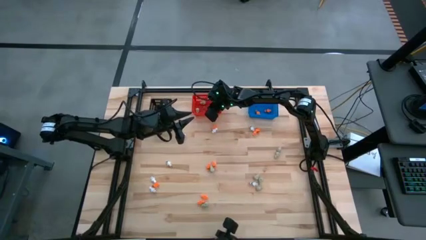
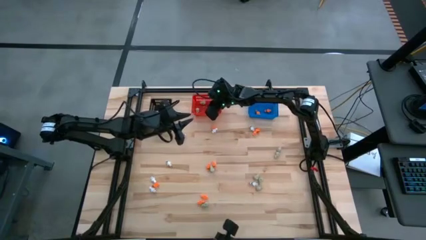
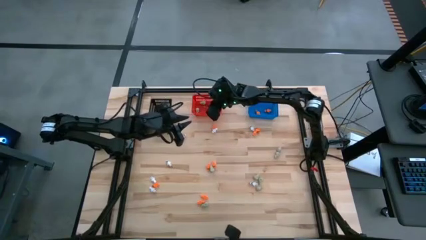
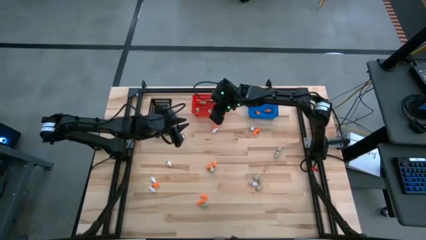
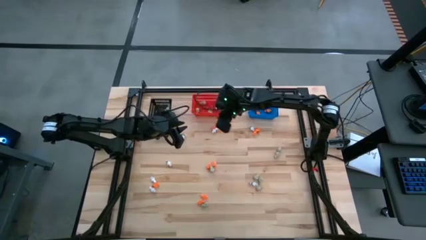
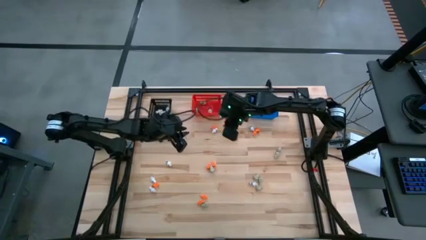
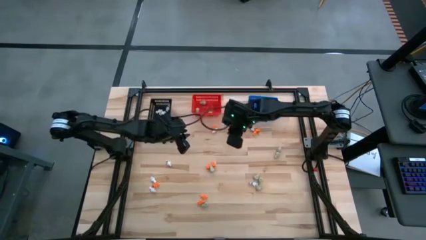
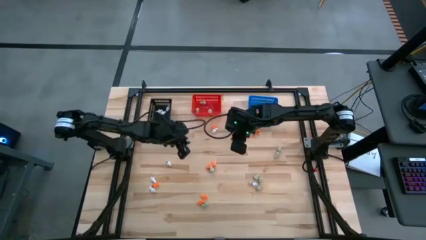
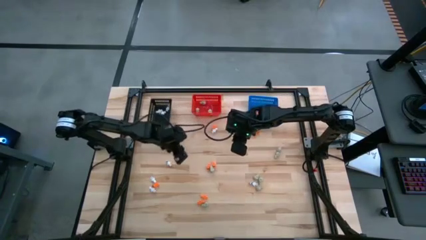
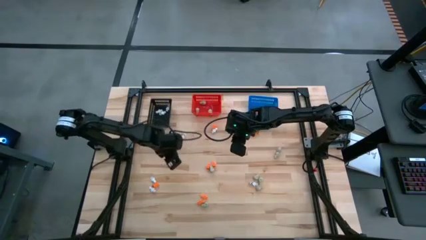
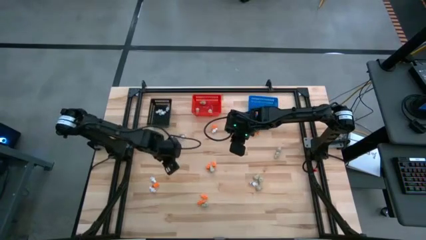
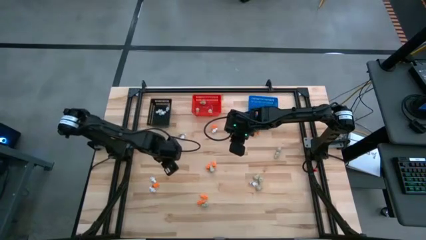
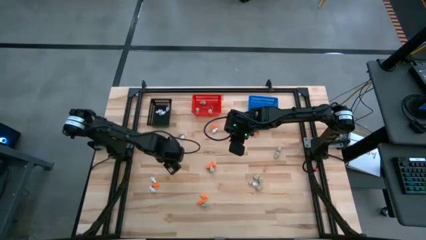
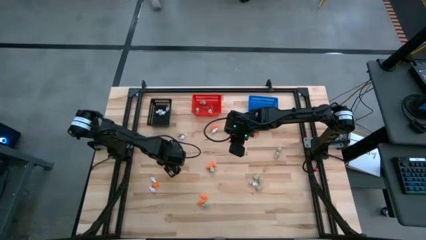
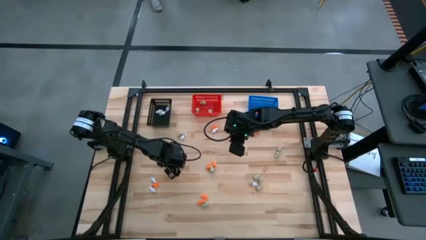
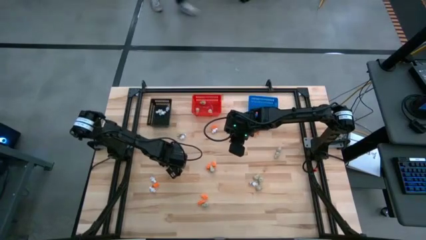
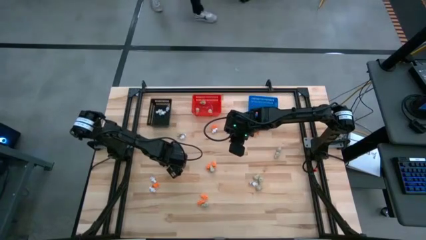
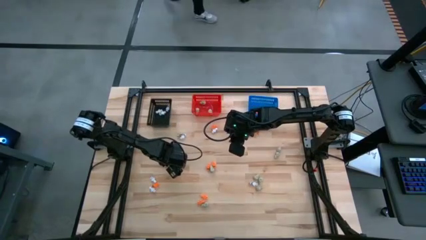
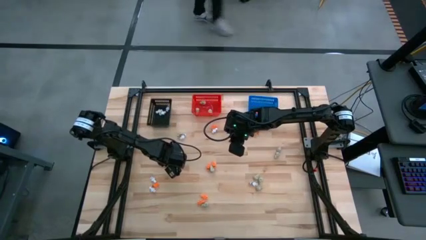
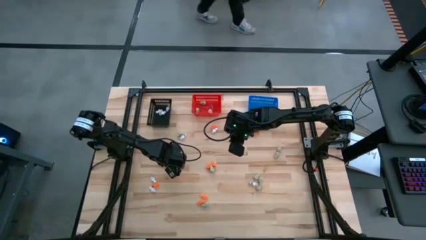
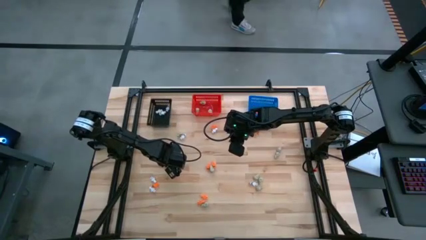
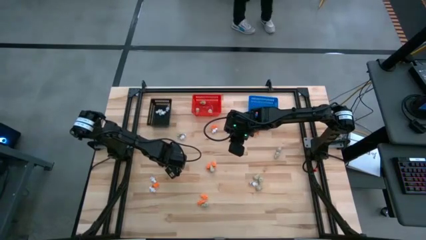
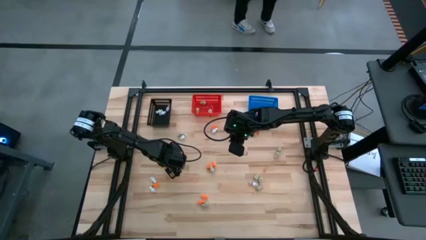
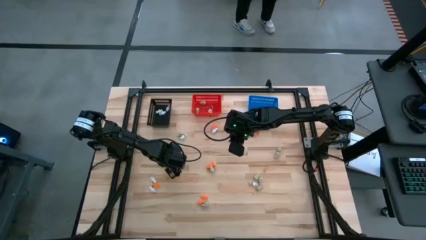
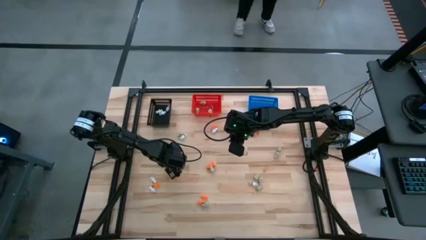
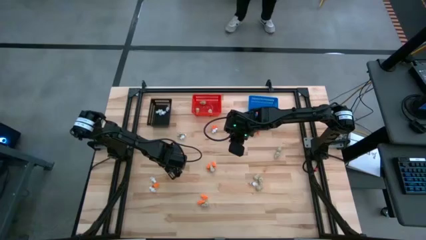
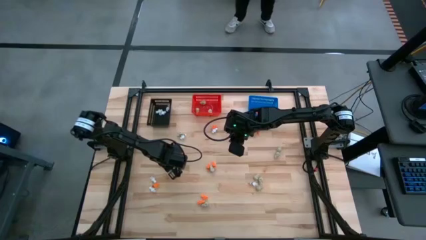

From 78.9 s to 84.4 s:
Task: Sort Halloween decoration
Put the white skeleton toy into the black bin

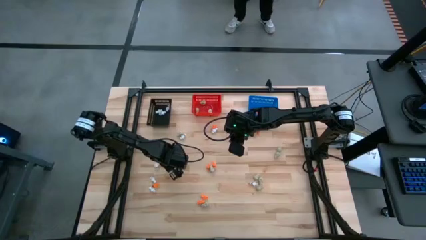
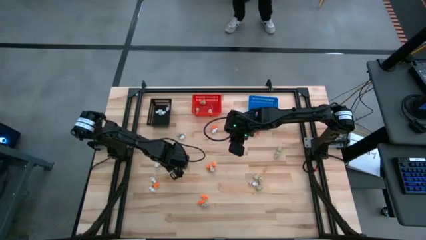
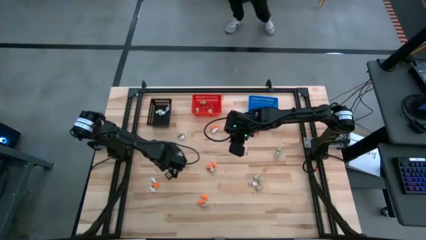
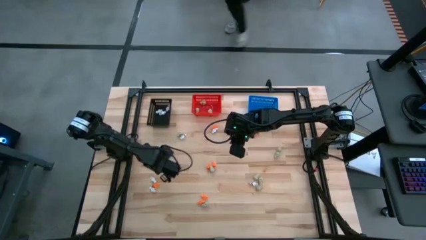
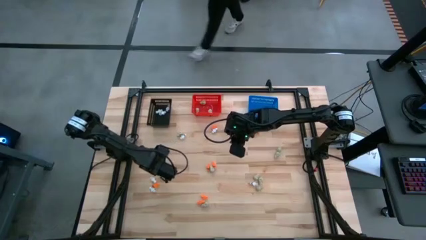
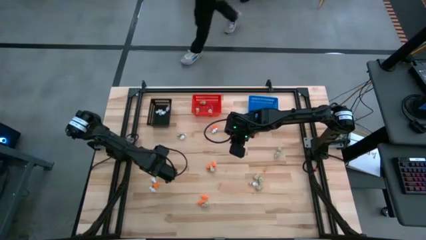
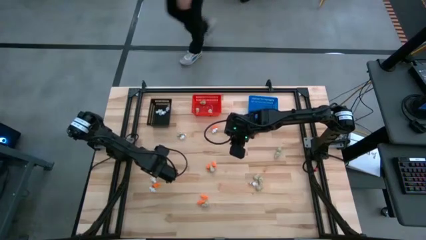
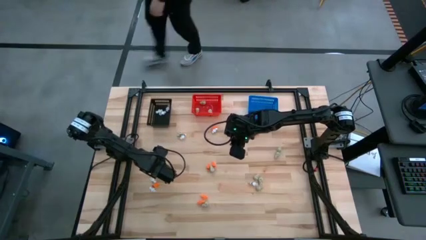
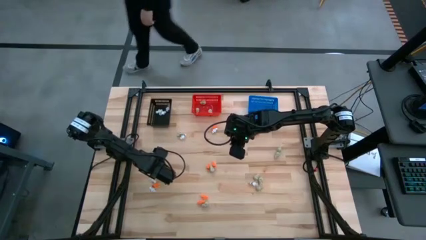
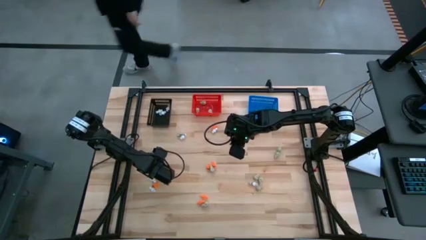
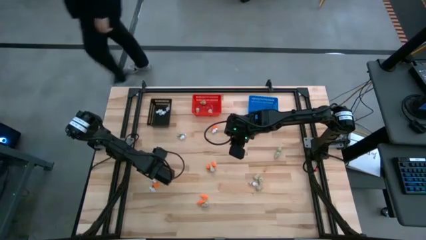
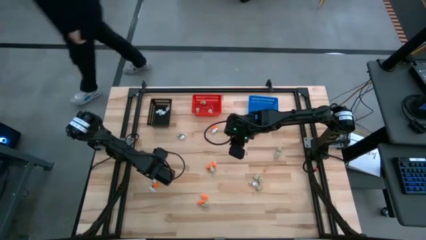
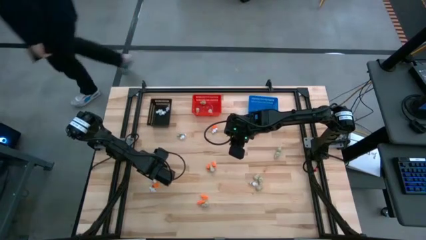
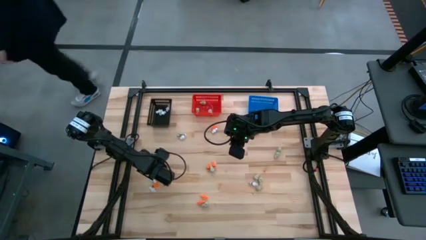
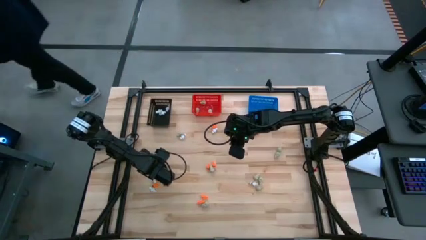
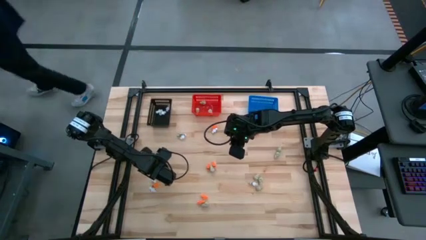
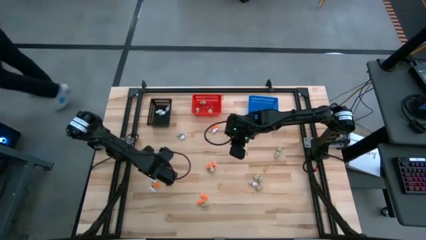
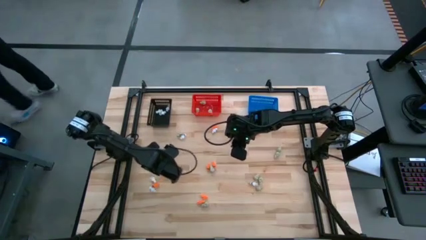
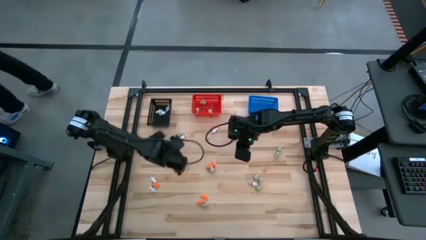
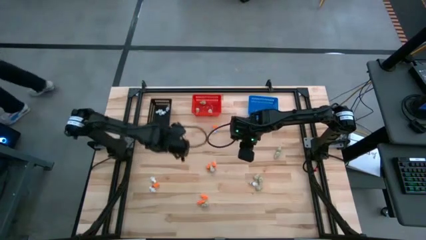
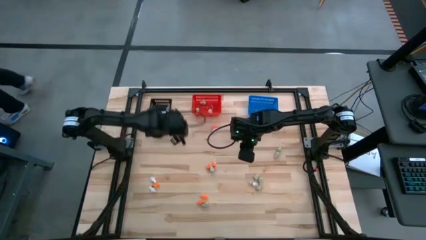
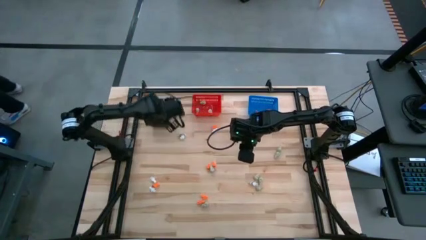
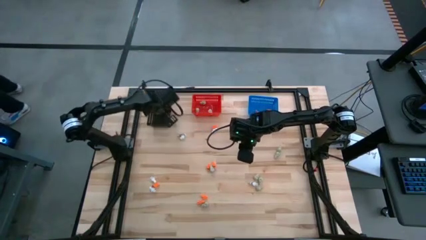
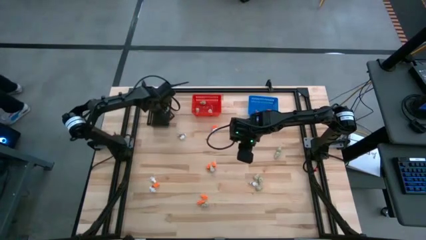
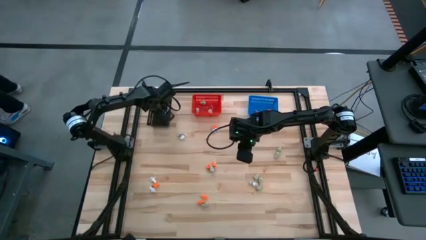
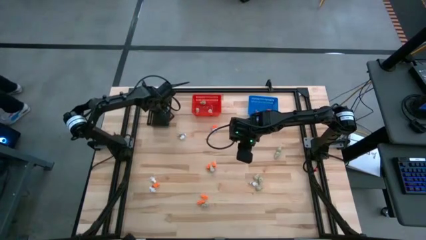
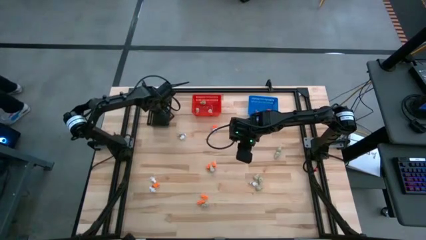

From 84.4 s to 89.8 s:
Put the white skeleton toy into the black bin
